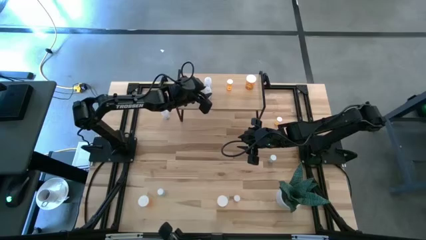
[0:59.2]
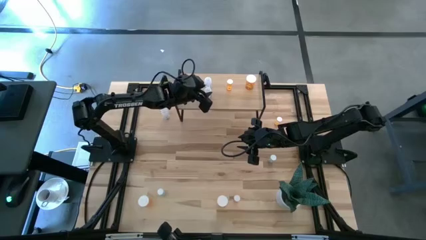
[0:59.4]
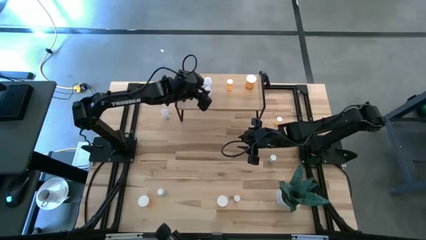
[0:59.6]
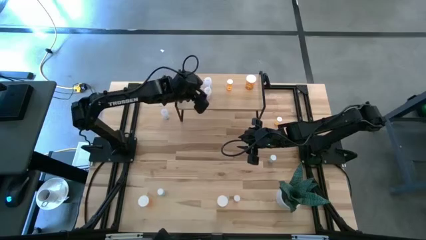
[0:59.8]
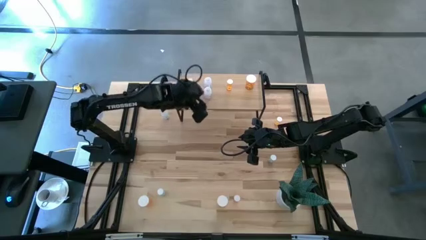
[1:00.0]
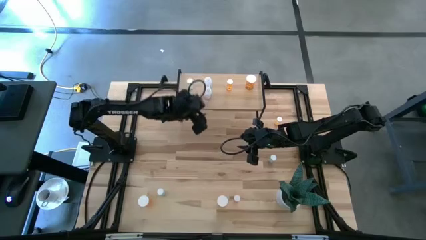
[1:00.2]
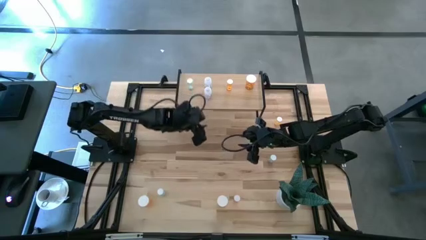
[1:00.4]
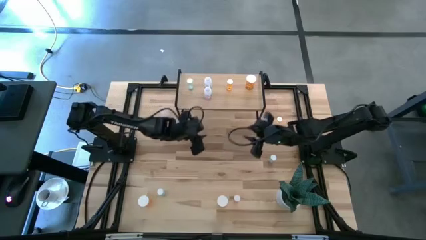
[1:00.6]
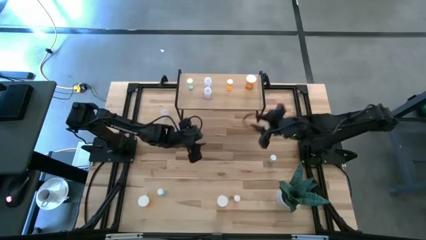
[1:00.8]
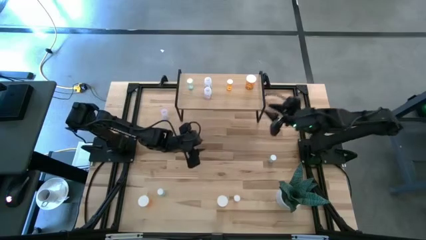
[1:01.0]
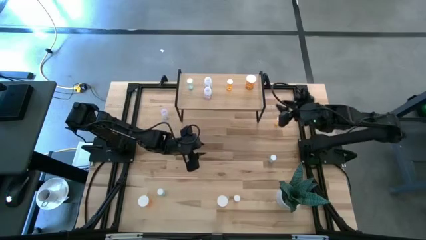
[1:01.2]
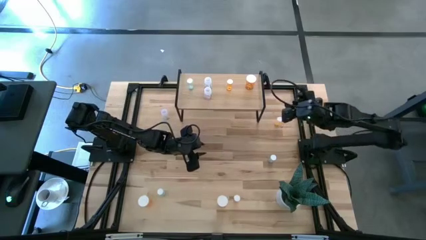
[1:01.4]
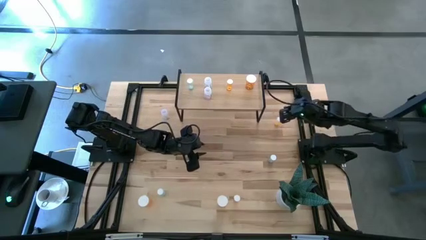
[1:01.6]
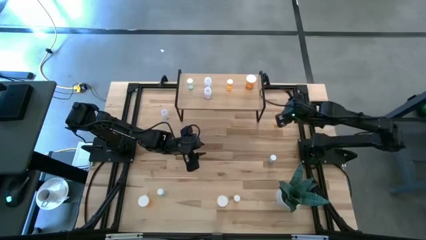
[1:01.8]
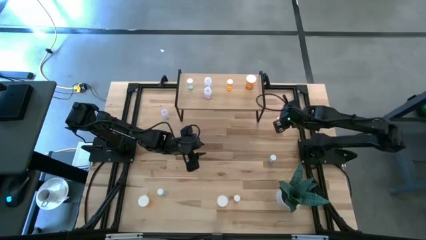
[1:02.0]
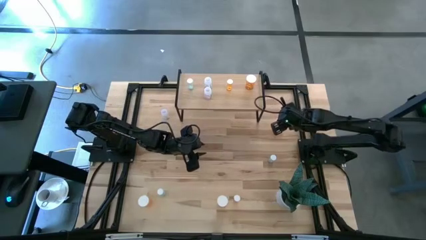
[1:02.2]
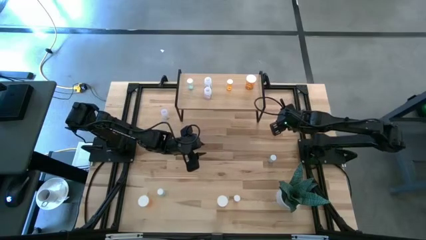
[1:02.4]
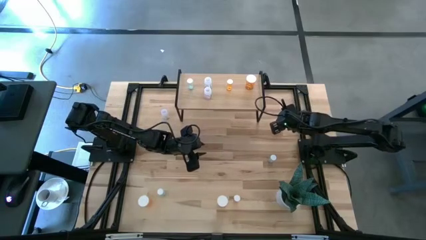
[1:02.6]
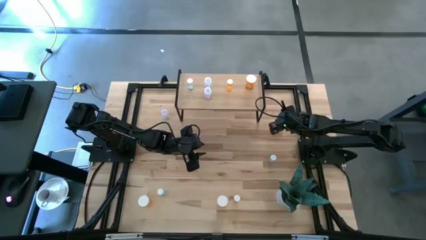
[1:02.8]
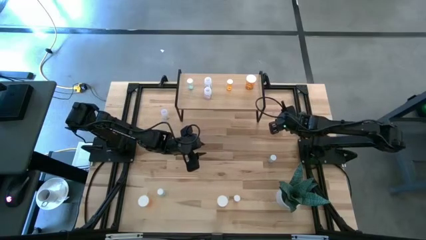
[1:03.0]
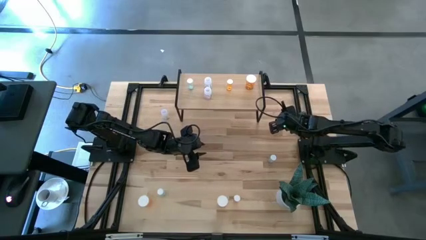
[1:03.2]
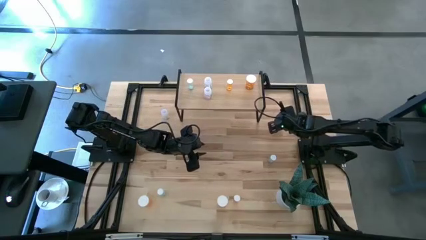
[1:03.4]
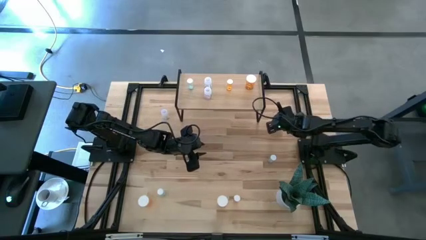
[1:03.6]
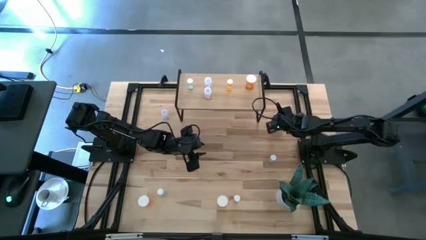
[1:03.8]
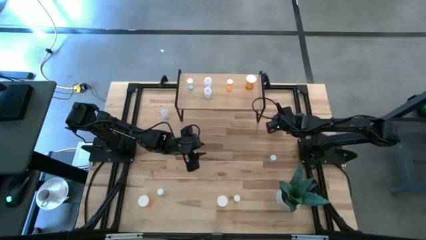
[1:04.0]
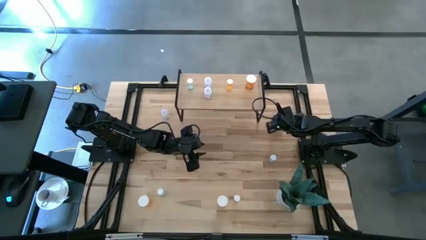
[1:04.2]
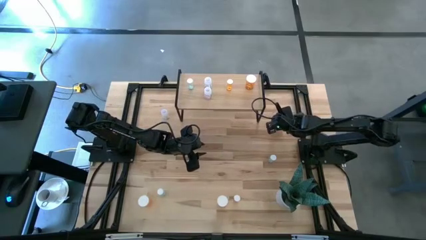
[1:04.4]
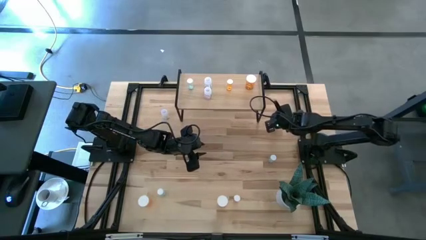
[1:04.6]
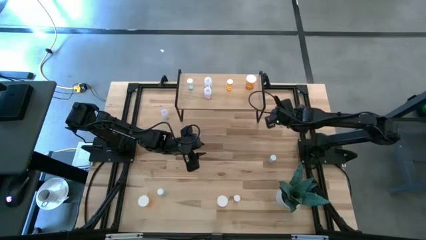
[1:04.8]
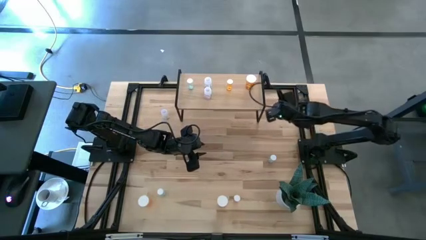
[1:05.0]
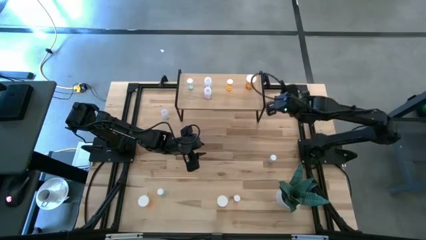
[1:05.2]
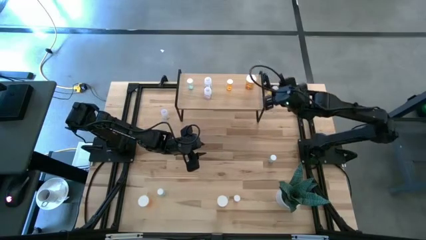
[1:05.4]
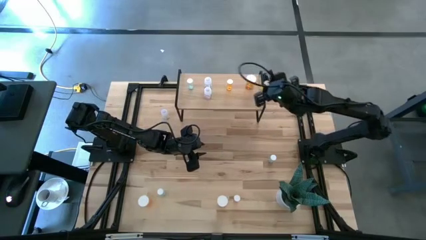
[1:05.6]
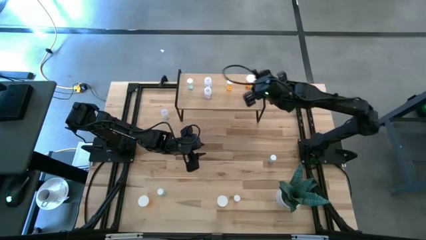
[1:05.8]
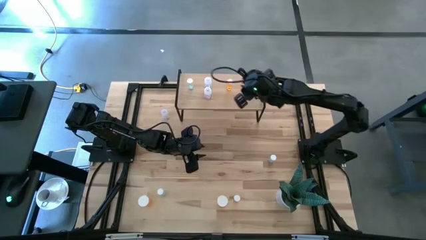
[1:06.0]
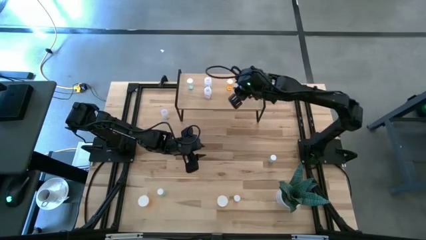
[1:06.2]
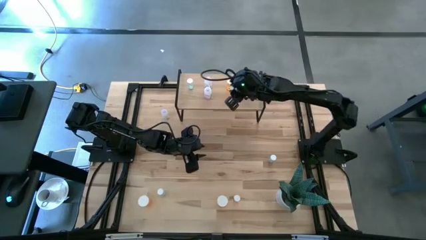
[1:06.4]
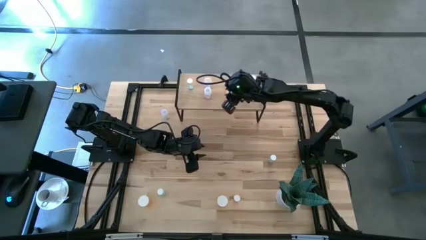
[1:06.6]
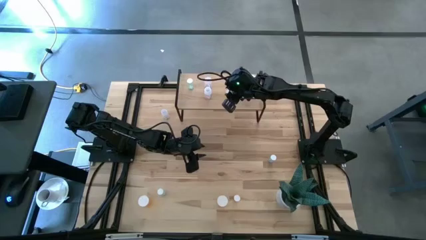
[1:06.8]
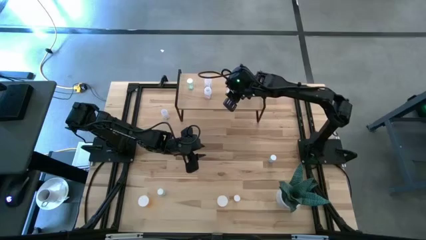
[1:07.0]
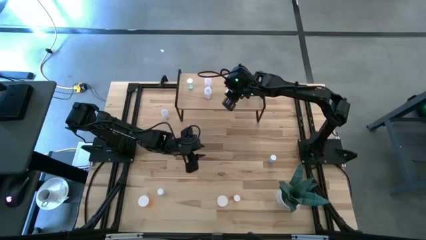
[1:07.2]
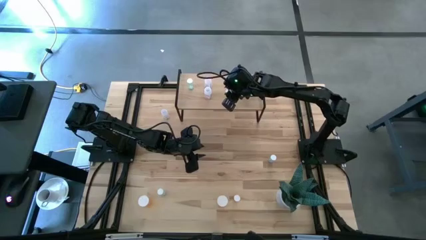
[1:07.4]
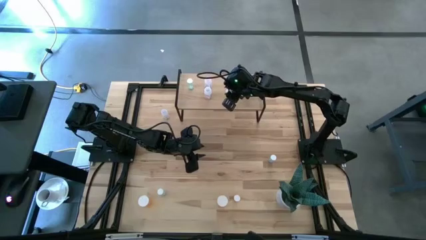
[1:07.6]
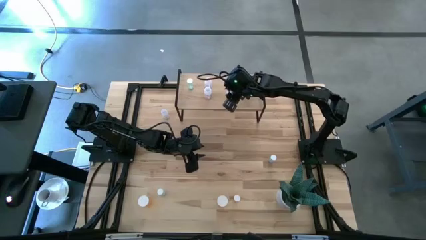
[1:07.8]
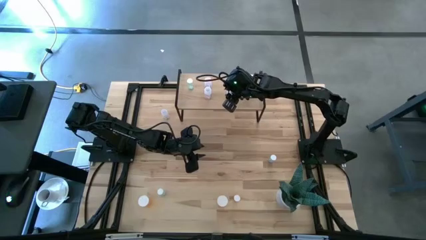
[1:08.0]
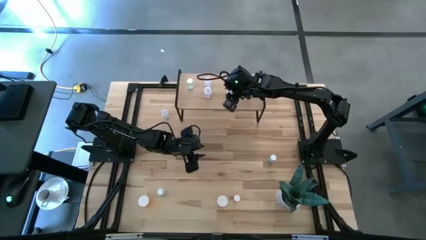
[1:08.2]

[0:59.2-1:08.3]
Task: Pick and place medicine bottles onto shelf by color
Put the top small orange pill bottle on the shelf aligned with the other small orange pill bottle

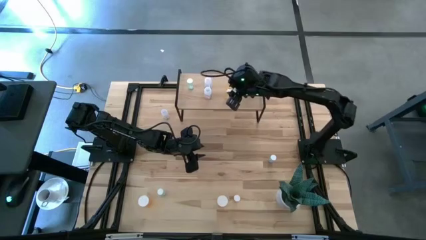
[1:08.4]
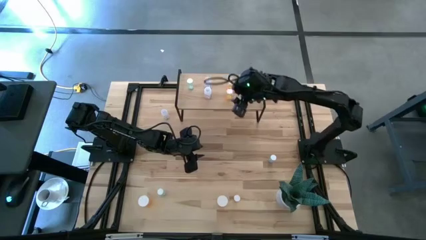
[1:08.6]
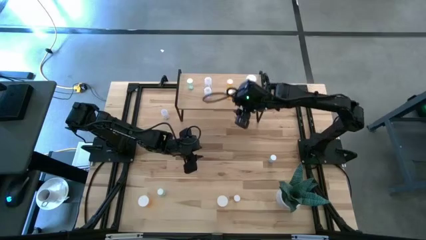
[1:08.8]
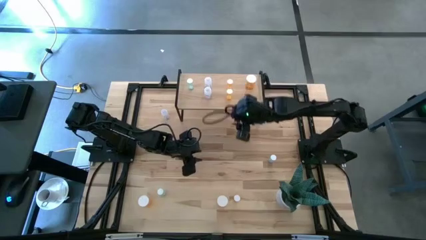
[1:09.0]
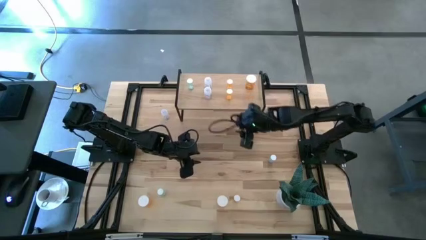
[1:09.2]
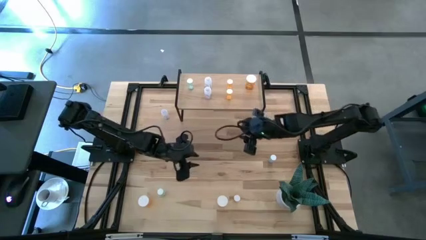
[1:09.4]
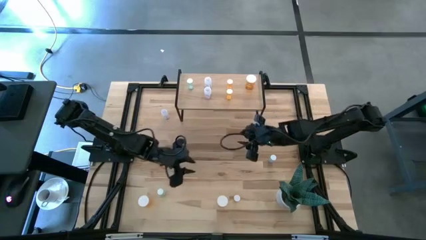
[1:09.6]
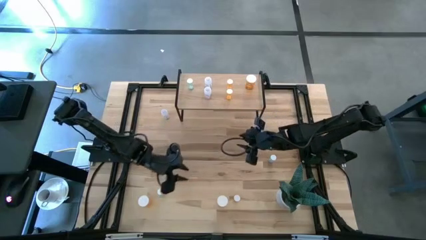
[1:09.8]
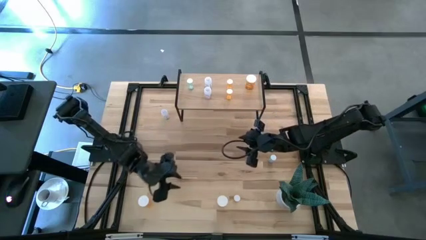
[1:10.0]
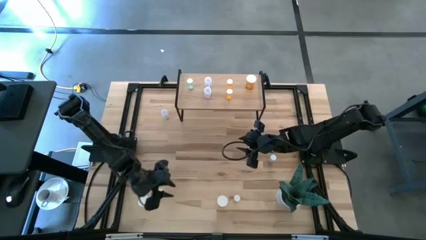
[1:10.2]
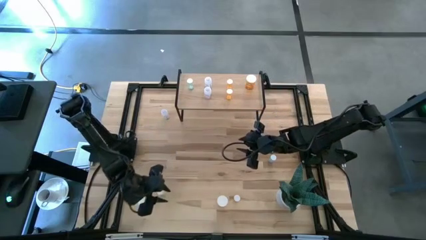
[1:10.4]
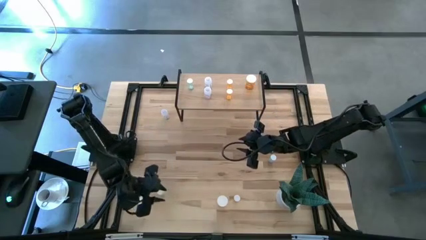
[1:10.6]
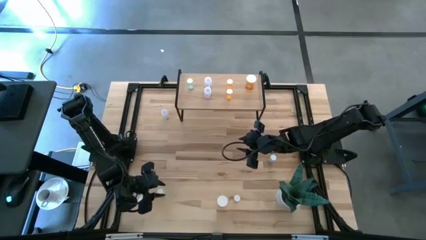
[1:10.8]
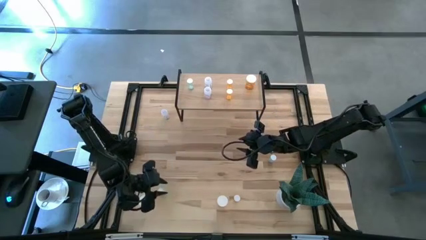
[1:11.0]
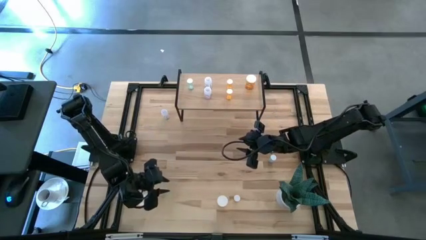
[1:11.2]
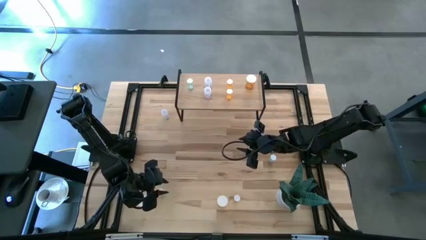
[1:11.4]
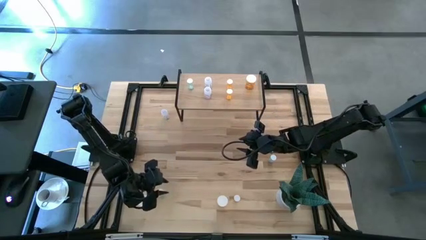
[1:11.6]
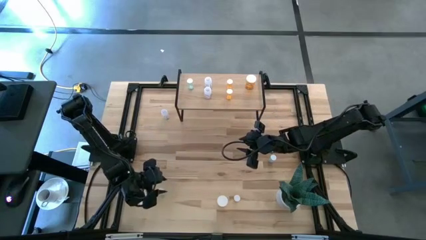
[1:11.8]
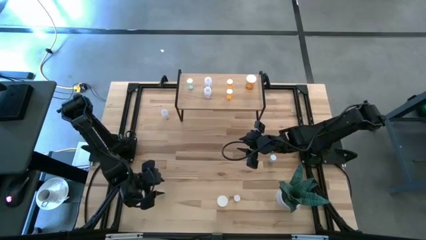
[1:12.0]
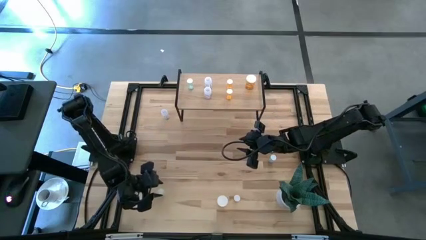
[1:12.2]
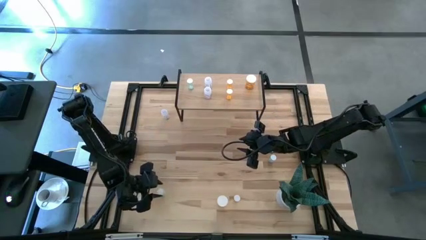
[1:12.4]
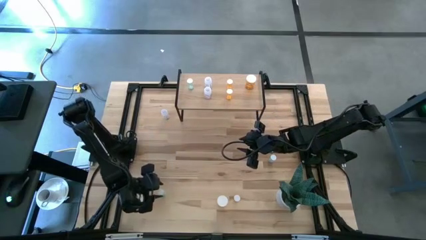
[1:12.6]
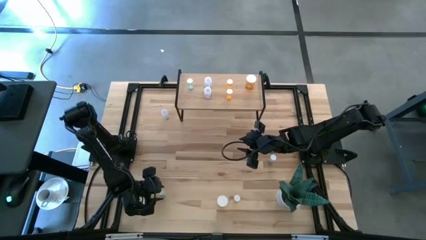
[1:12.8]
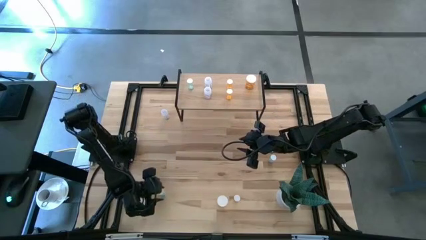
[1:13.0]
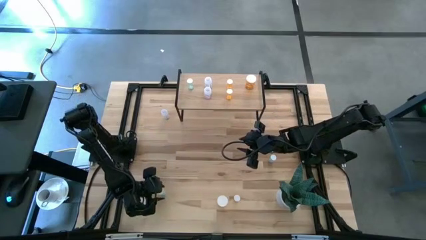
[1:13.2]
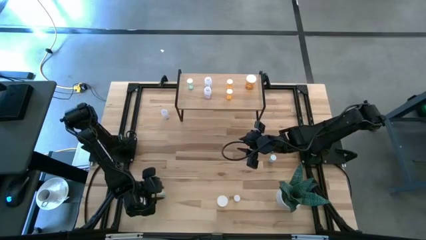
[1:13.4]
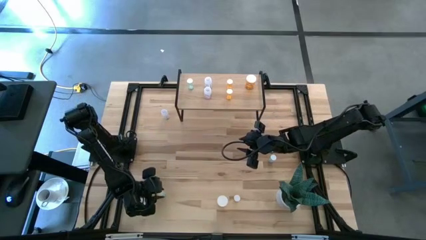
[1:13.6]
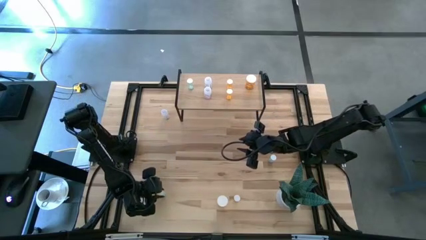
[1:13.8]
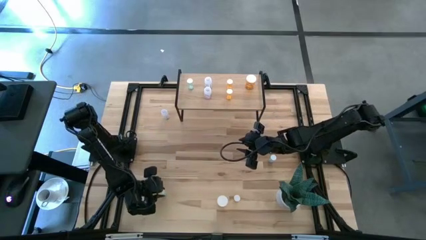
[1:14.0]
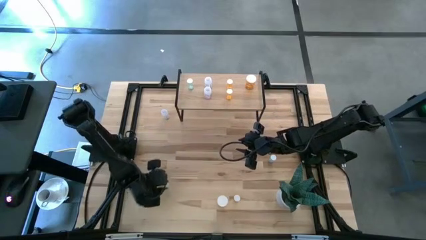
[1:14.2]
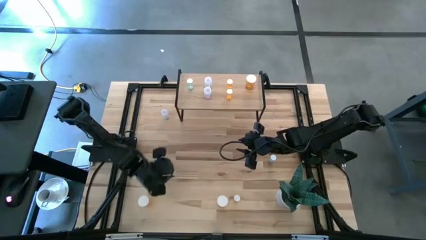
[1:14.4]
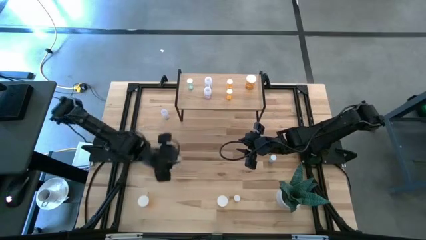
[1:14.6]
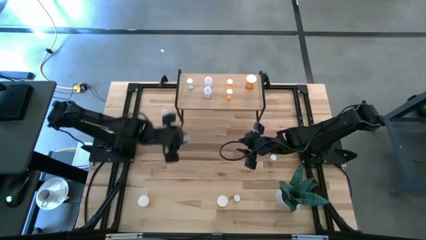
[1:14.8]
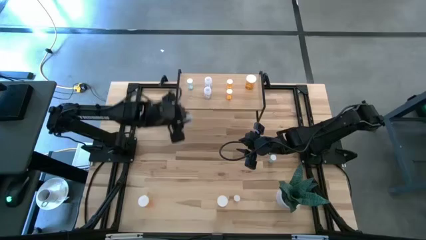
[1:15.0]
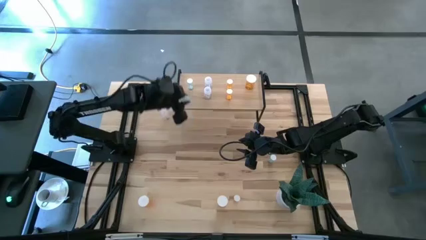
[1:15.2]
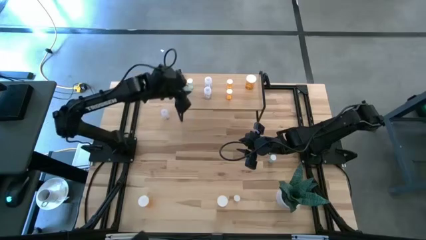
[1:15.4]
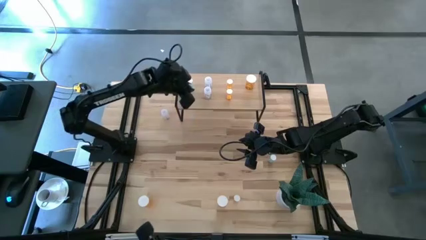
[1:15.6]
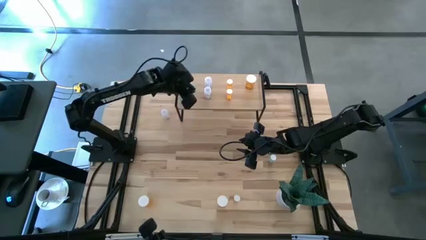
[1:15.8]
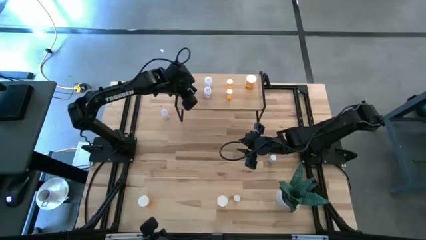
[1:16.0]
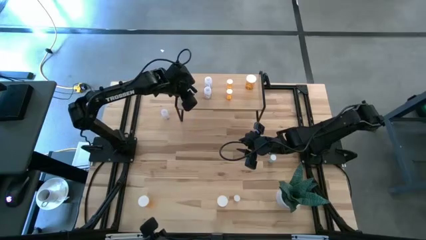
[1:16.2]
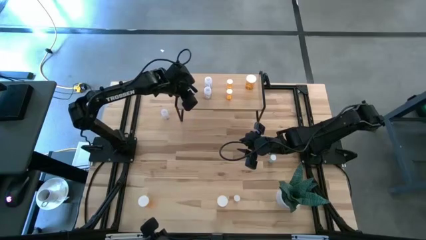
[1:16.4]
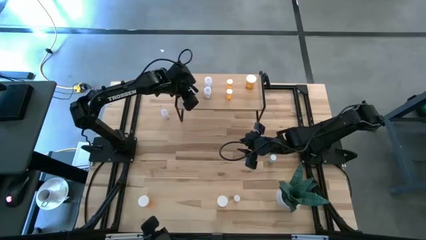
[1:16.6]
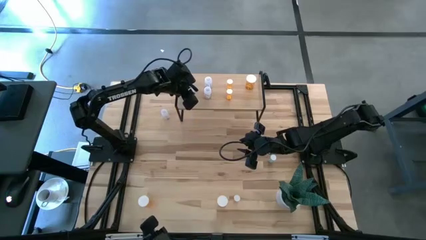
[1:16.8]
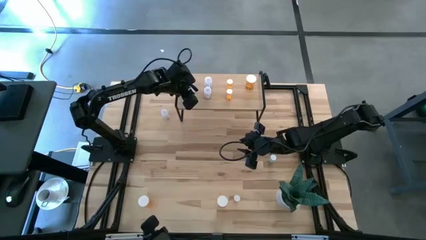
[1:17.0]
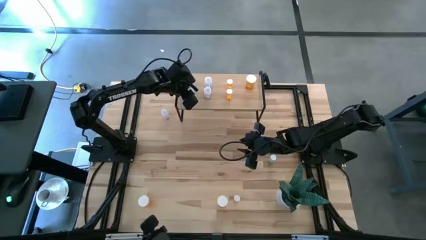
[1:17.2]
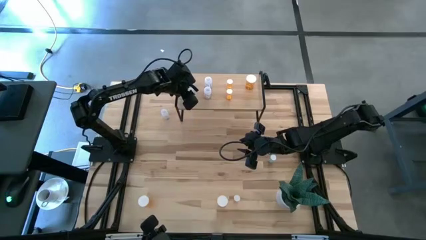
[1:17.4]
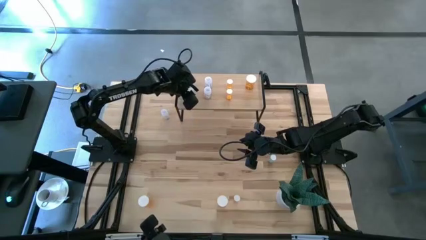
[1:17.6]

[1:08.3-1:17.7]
Put the bottom blue pill bottle on the shelf aligned with the other blue pill bottle
